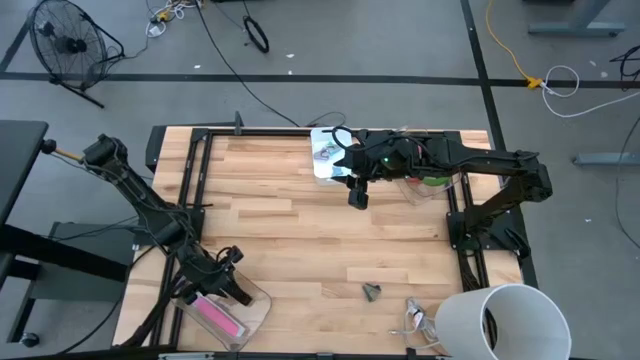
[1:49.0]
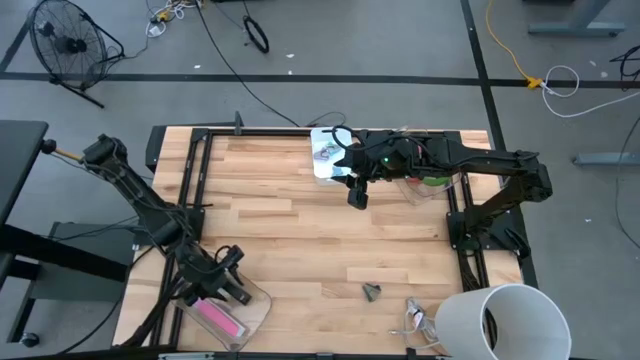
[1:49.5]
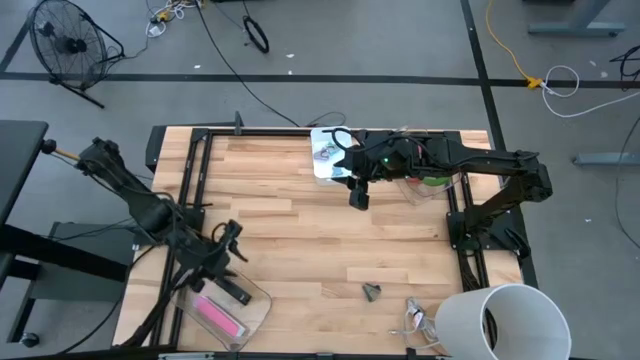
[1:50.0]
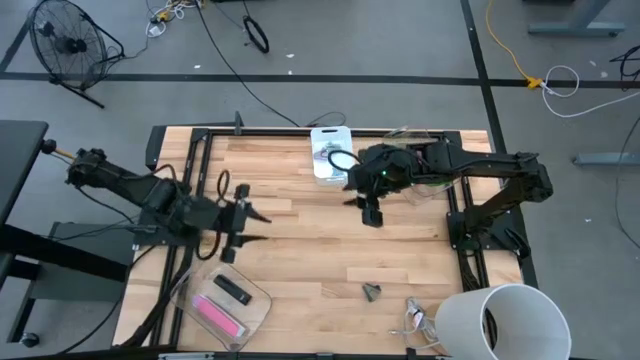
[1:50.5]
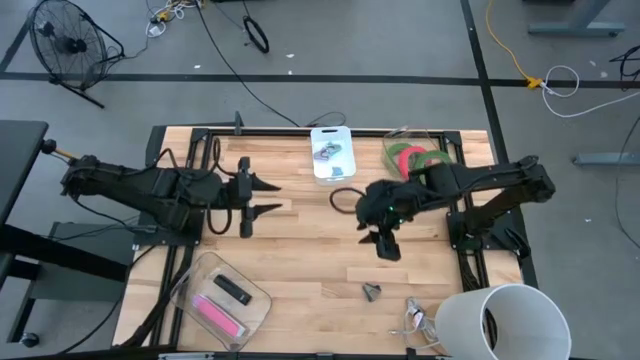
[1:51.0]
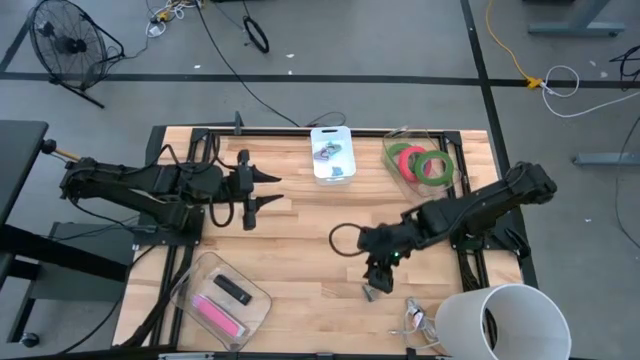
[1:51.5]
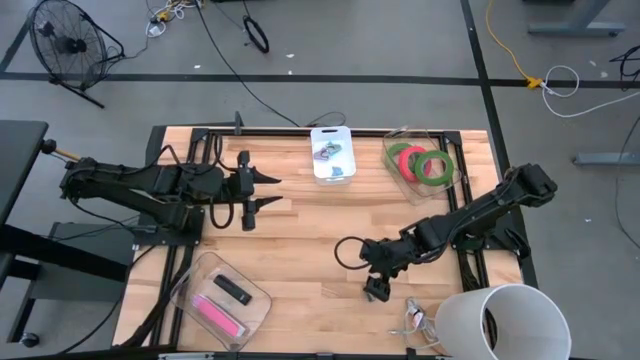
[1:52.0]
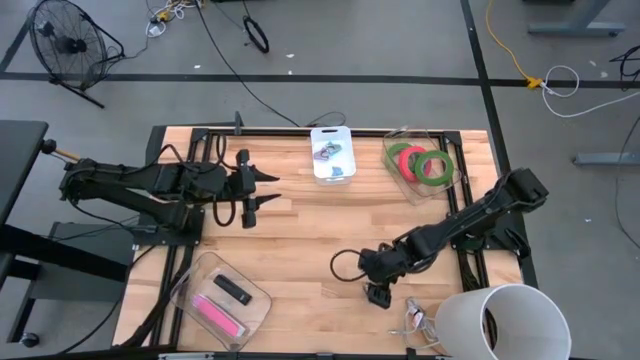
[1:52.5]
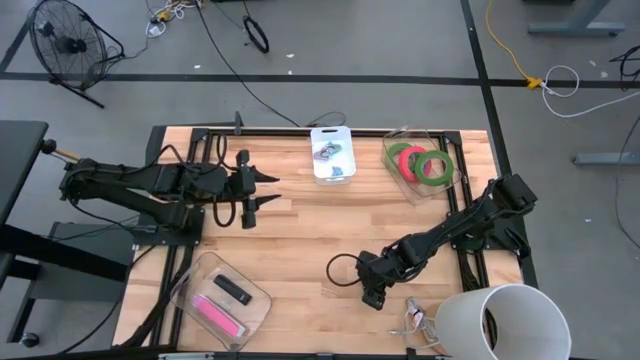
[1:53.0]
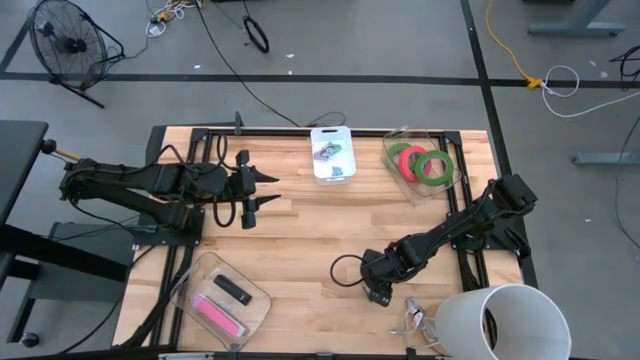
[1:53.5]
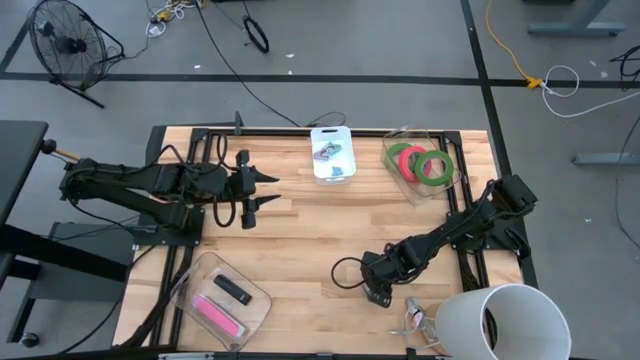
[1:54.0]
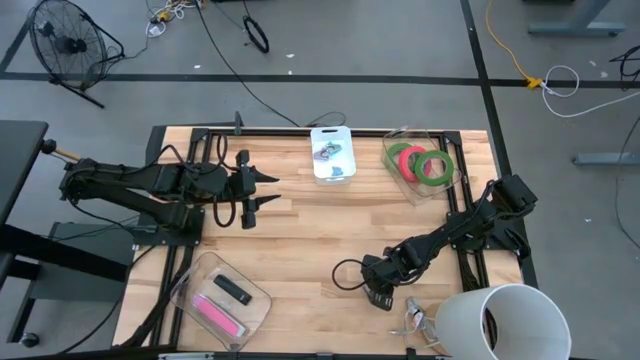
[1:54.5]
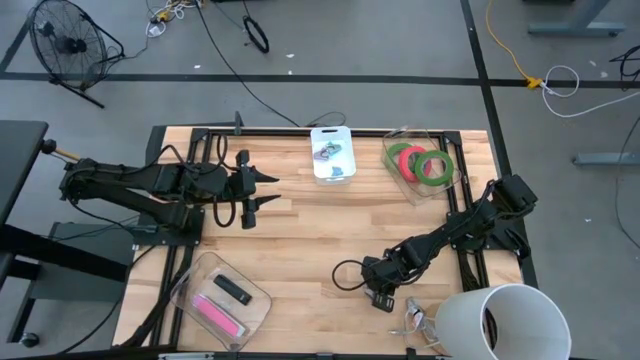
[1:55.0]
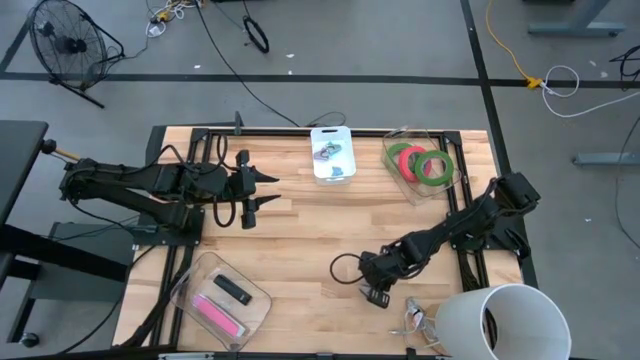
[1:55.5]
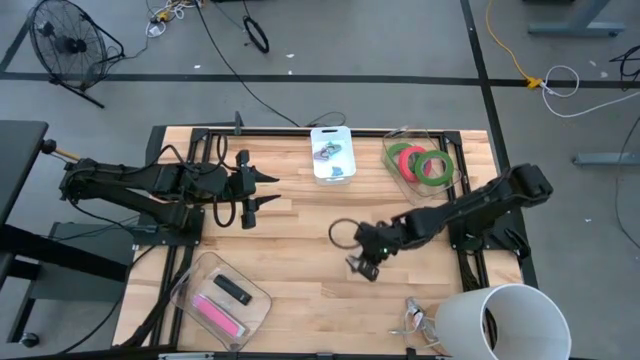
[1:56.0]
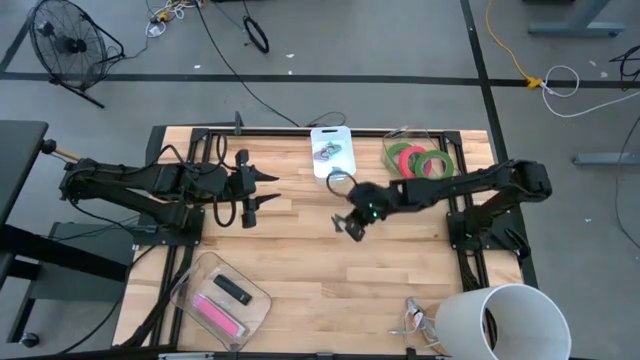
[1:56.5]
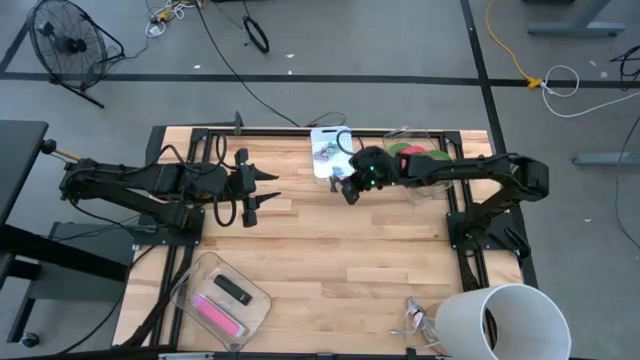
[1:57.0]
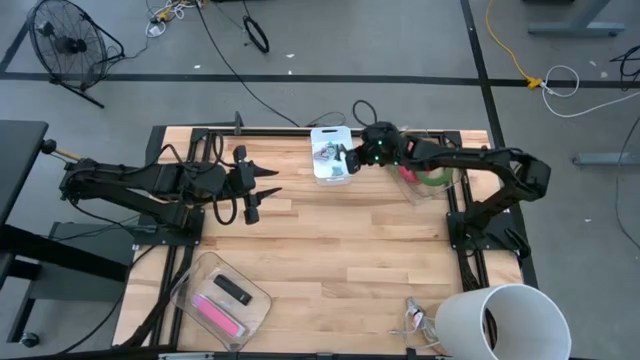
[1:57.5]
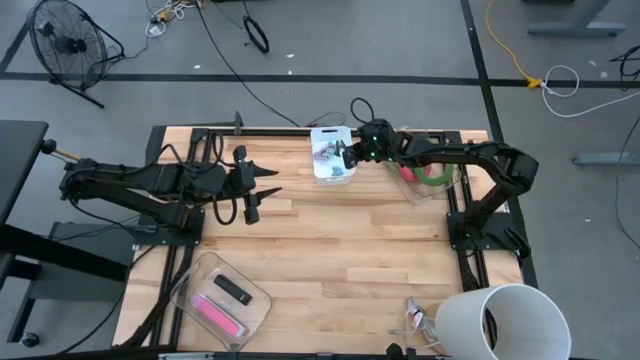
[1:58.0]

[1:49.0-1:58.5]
Task: Pick and place Stapler, Stapler remover, tape
Put the black staple remover into the white bin

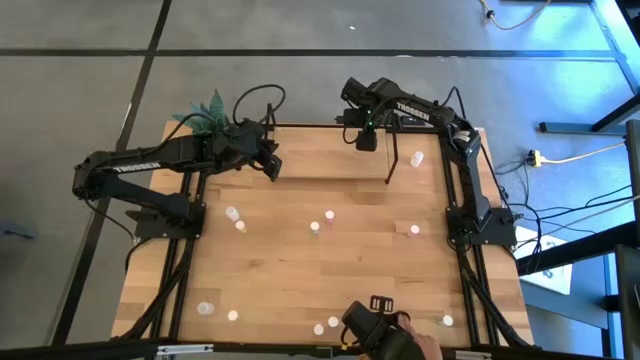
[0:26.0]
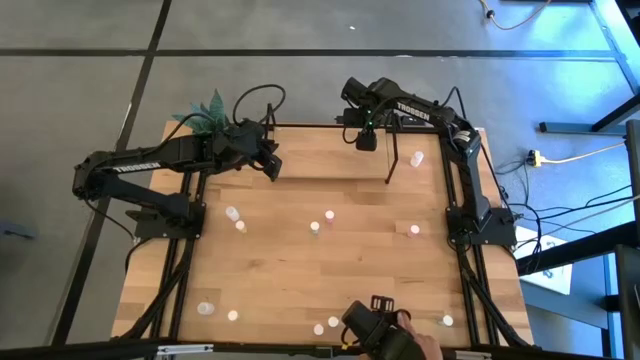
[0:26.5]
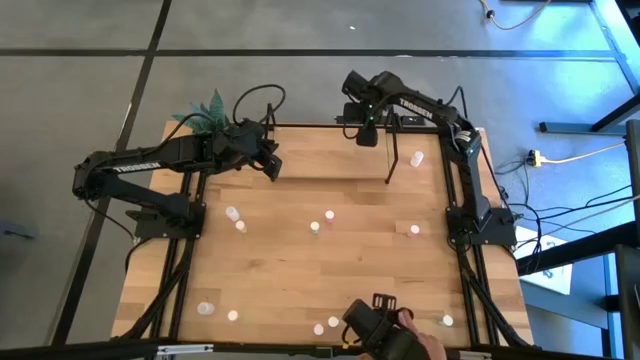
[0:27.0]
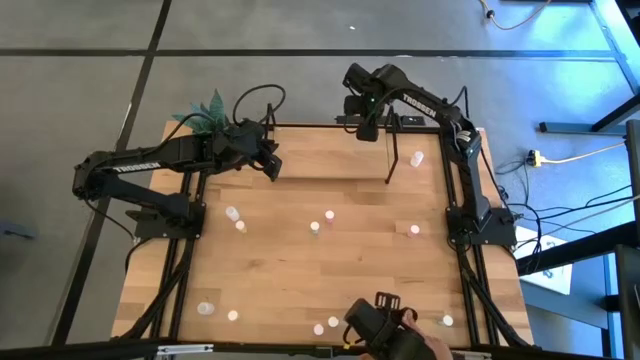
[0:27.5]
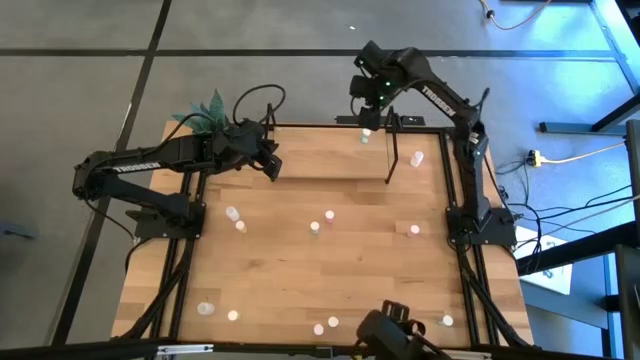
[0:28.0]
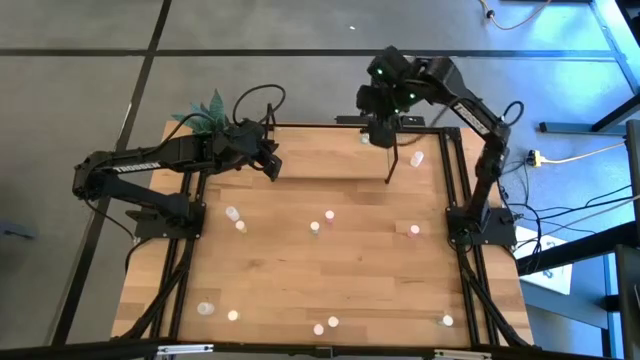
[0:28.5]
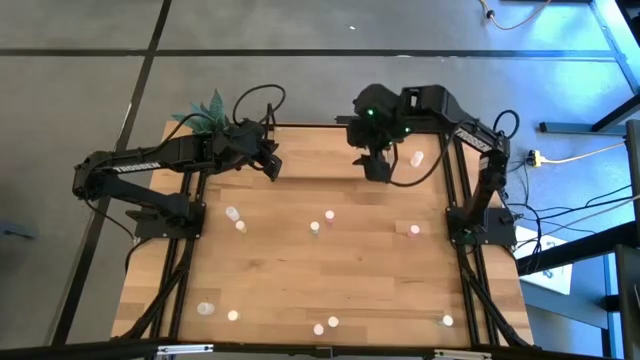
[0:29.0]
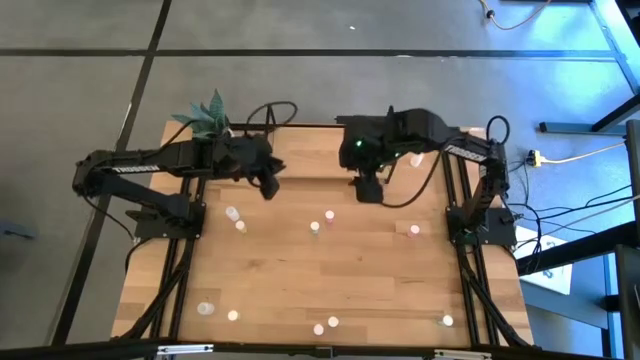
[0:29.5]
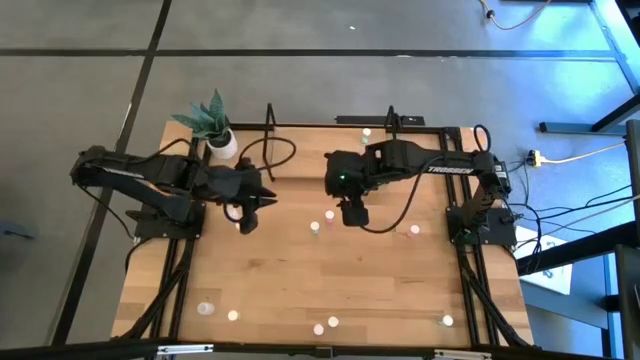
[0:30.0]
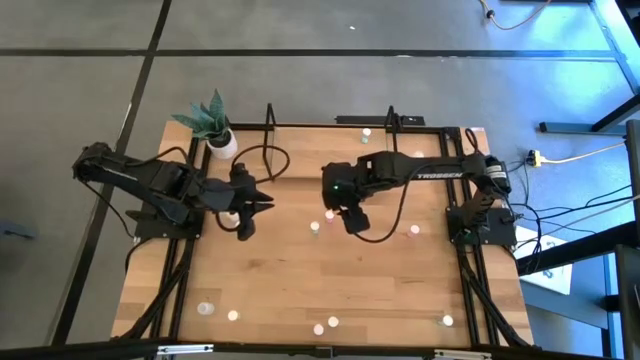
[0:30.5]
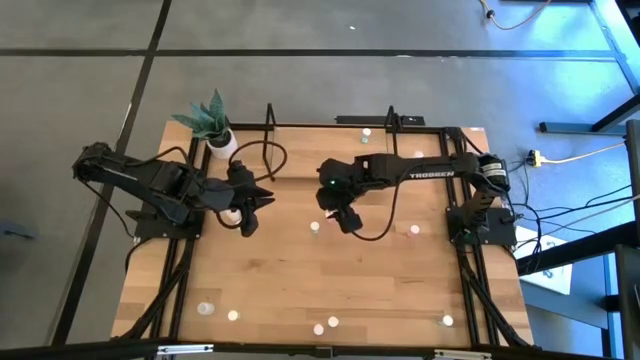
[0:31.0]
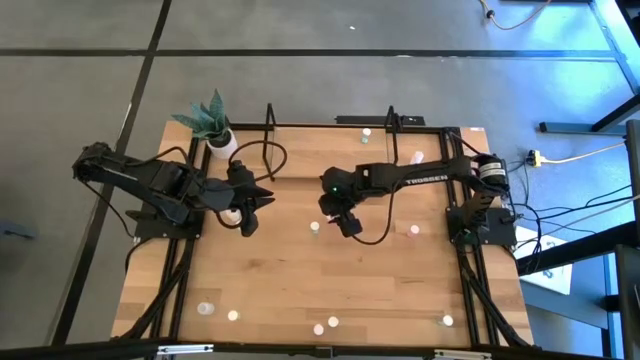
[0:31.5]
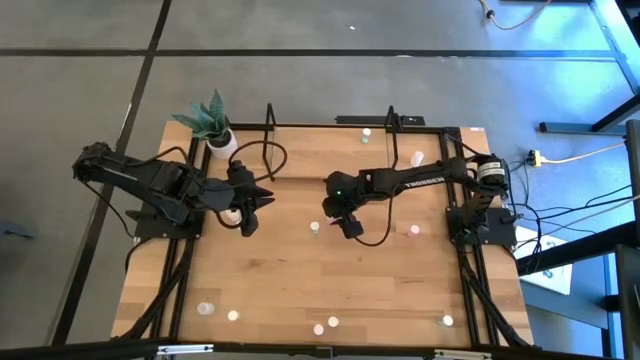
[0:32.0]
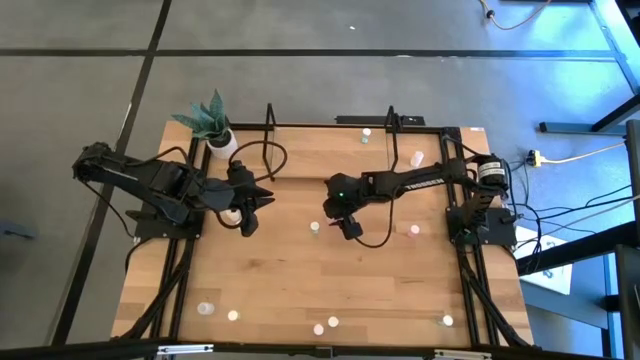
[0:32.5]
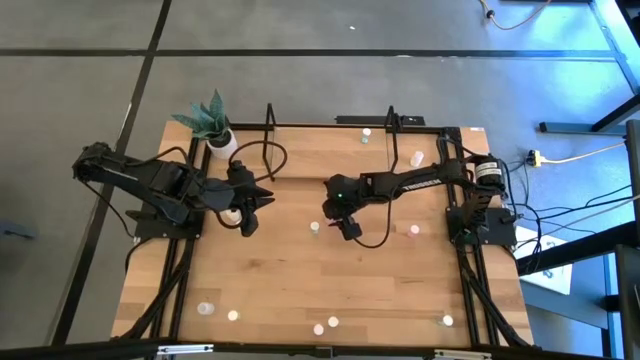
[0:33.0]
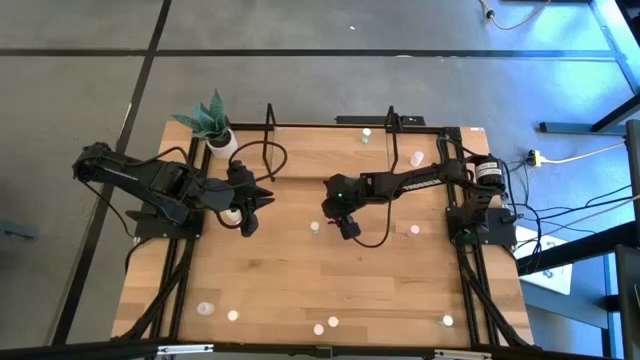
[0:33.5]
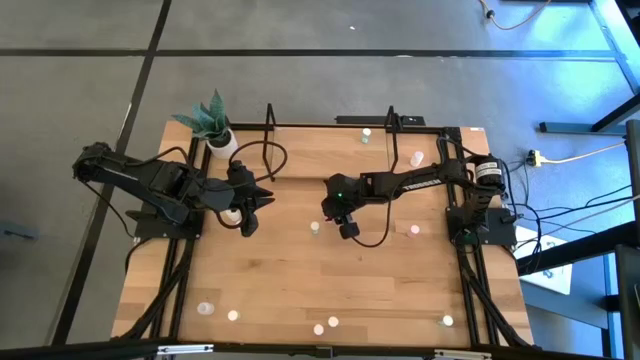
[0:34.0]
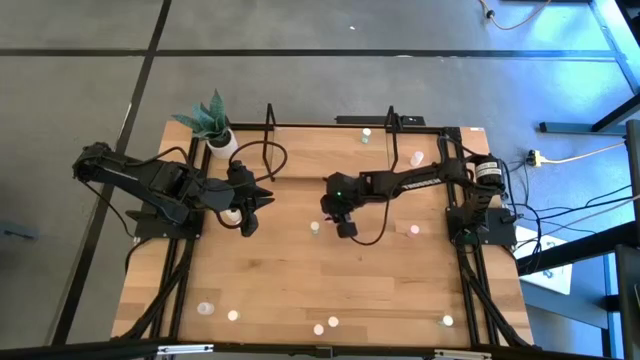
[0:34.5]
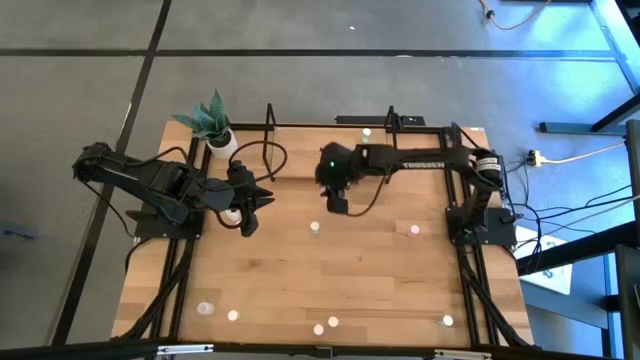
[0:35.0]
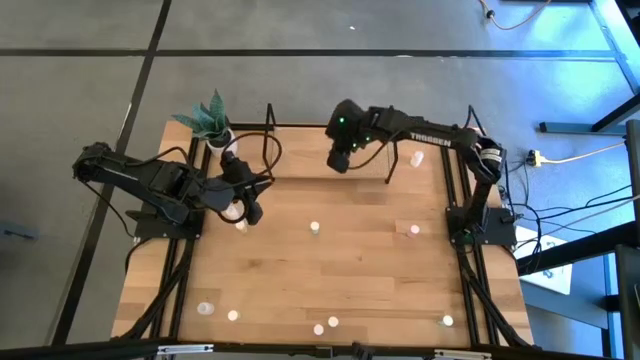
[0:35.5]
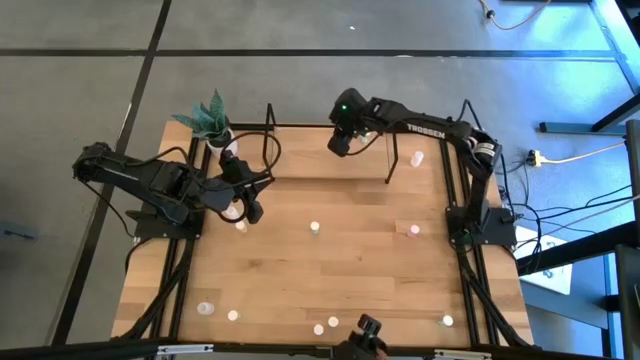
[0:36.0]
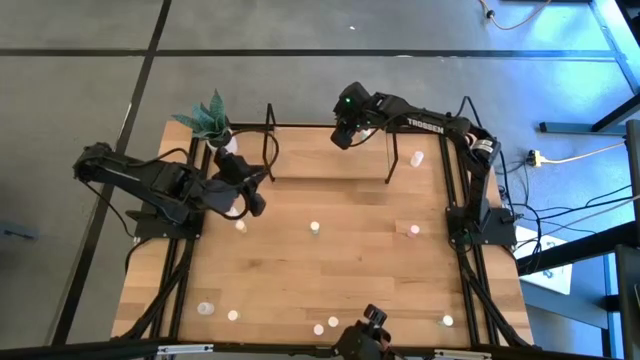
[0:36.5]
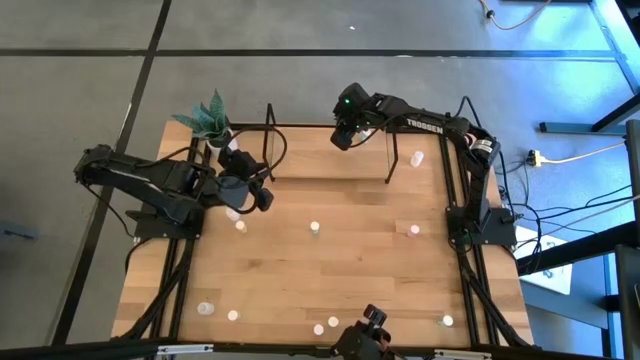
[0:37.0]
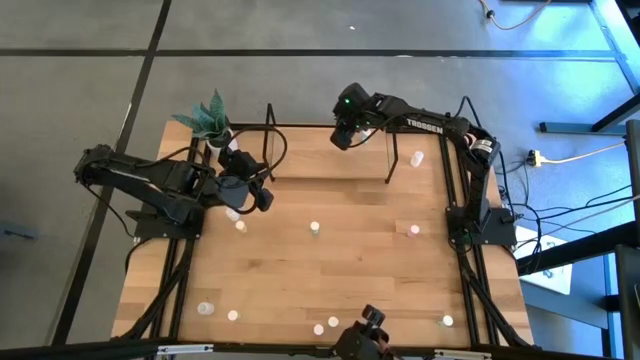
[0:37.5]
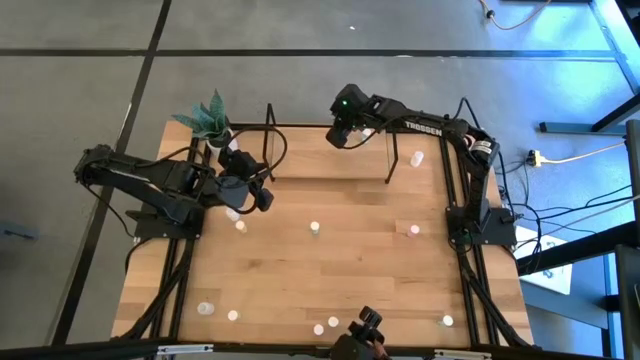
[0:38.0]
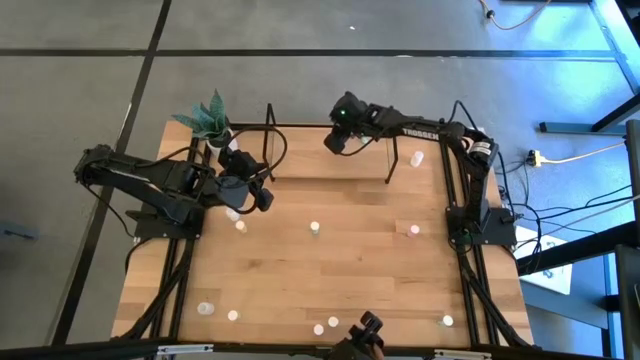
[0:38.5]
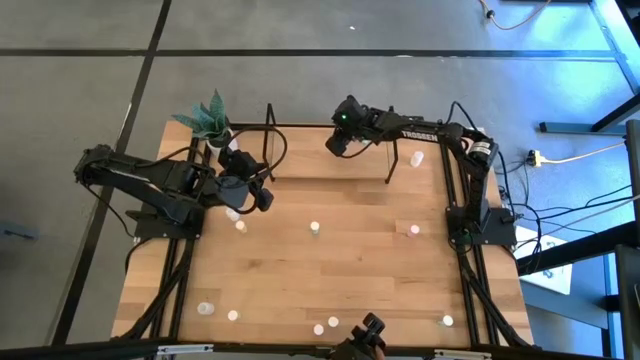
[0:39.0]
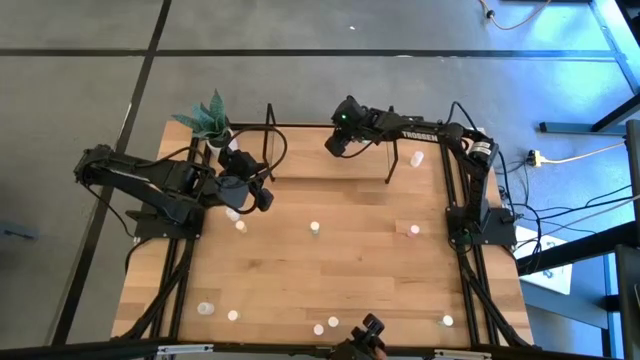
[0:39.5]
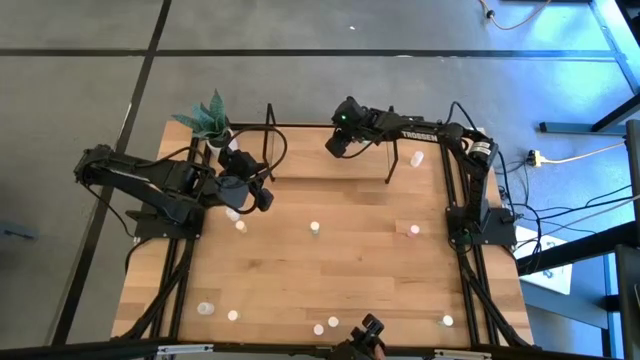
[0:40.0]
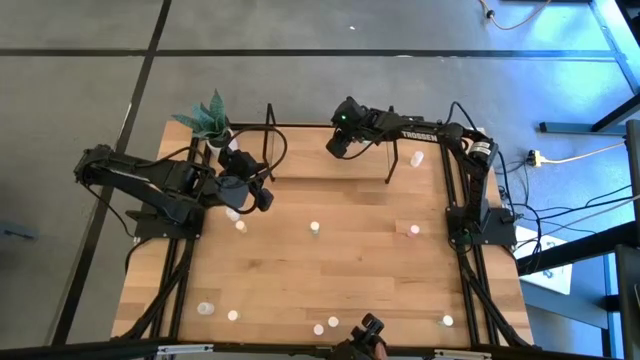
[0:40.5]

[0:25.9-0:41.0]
Task: Pick and place medicine bottles onto shelf by color
Put the top left pink pill bottle on the shelf
